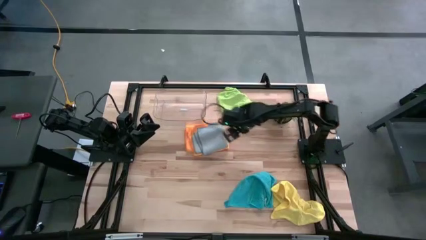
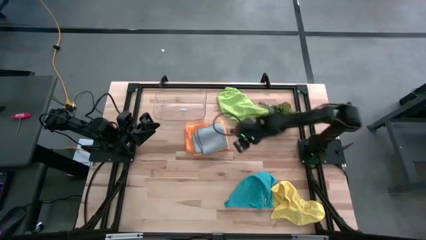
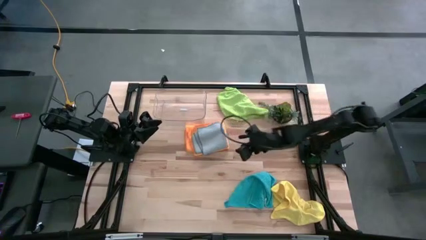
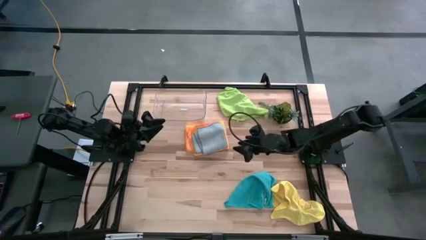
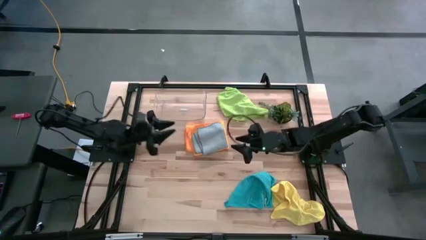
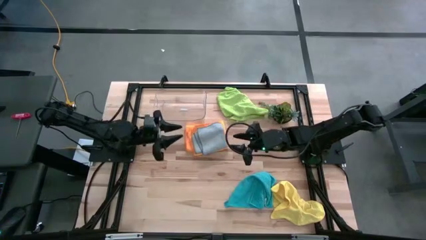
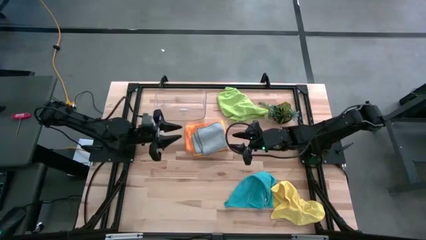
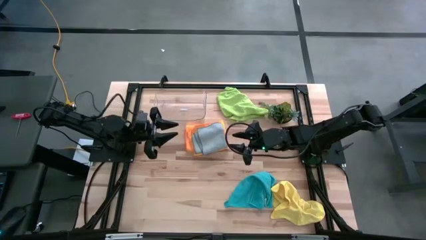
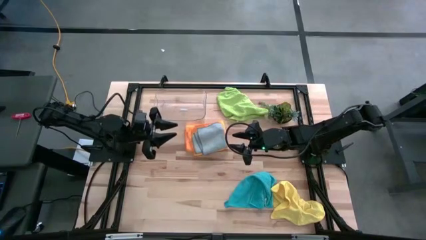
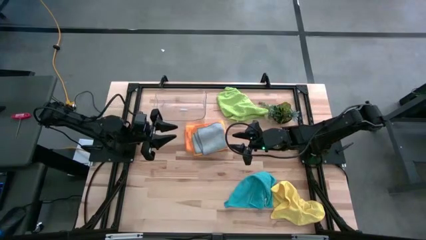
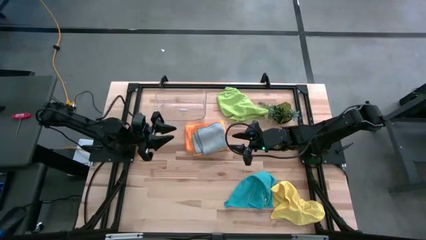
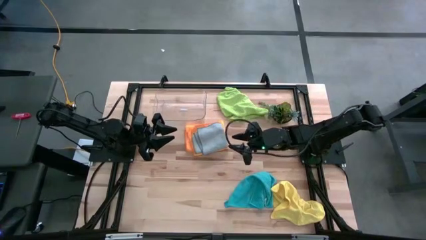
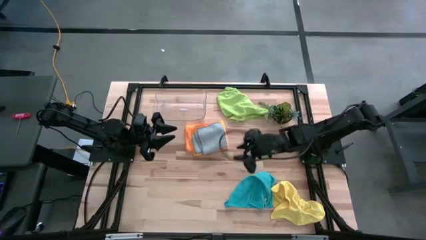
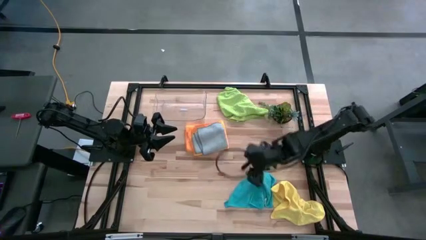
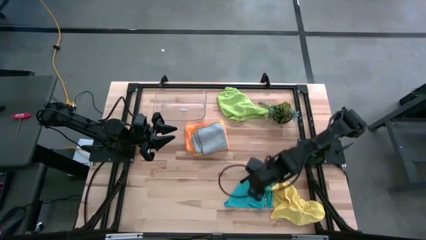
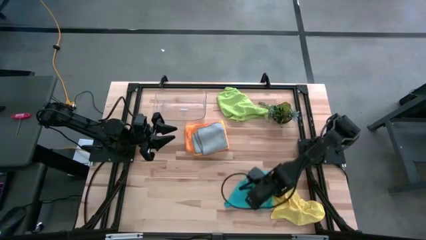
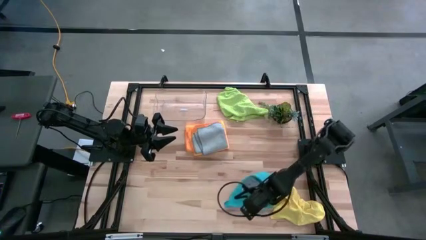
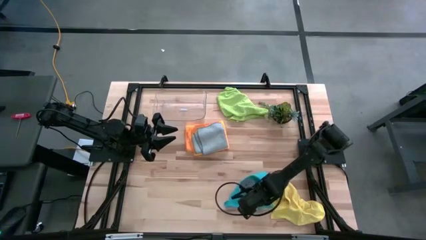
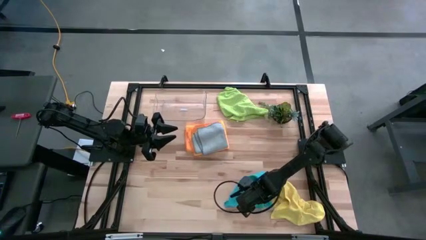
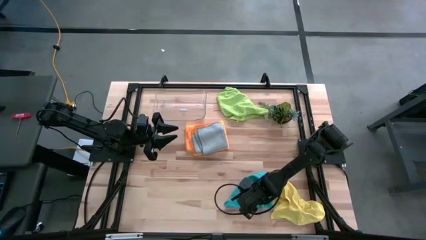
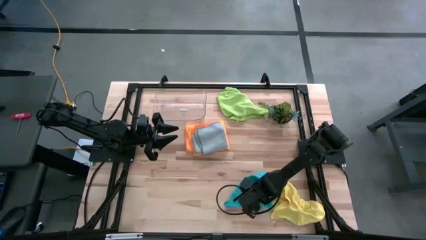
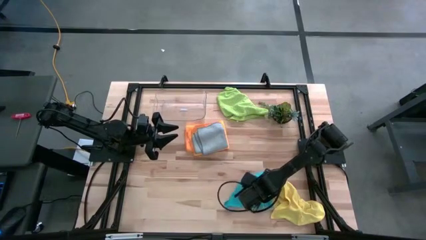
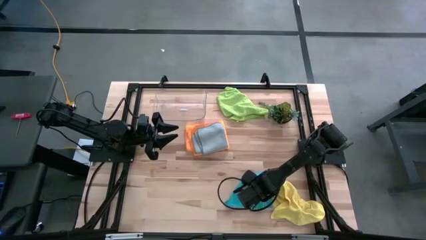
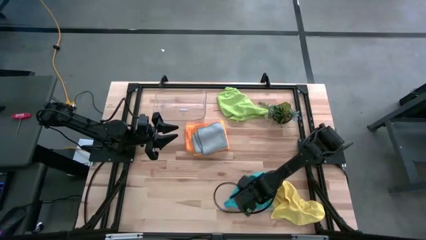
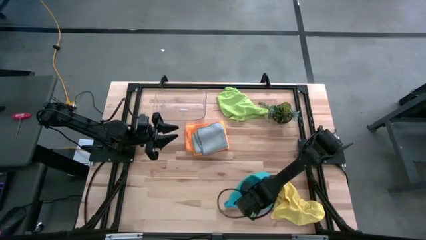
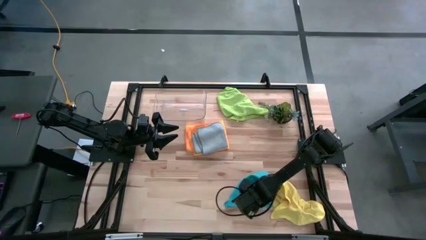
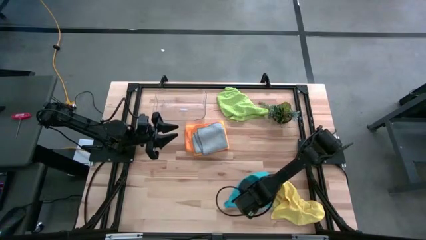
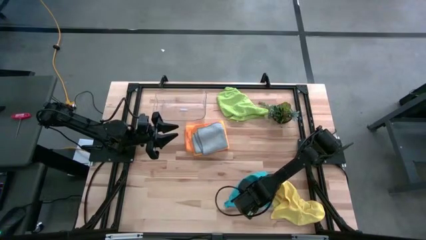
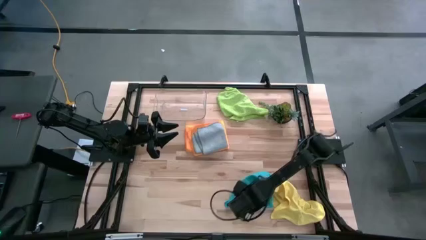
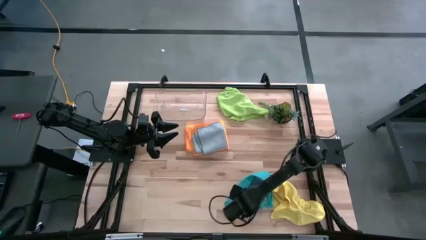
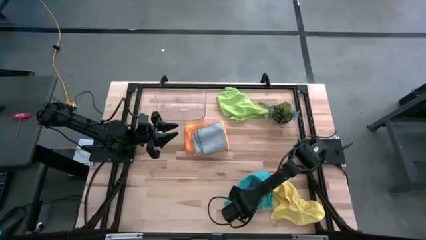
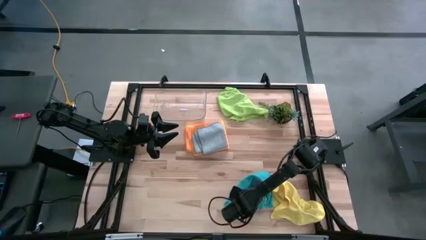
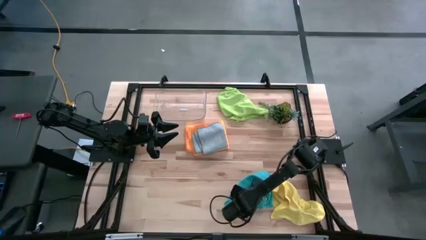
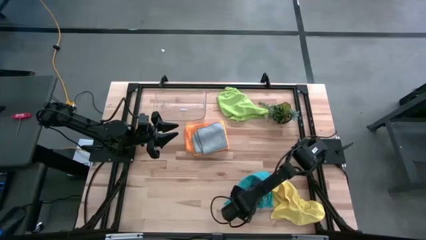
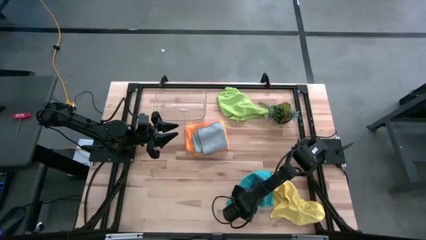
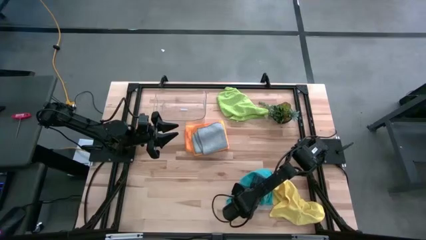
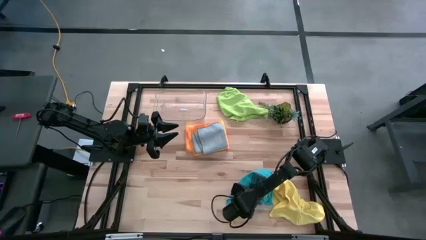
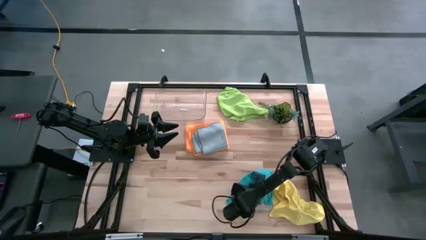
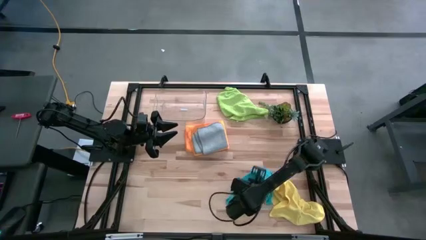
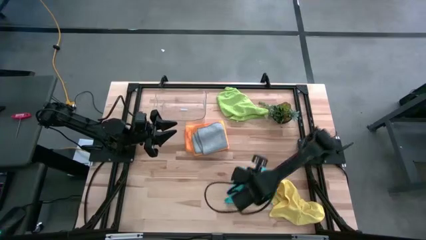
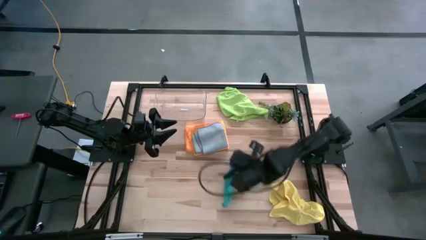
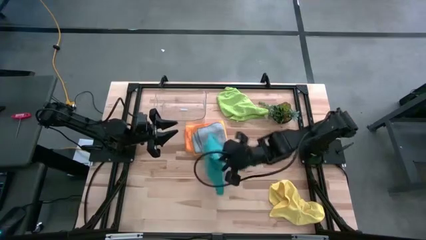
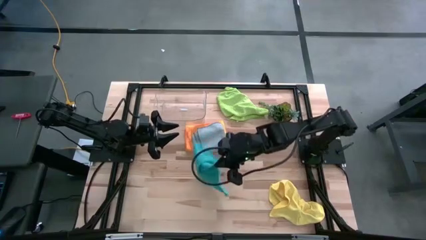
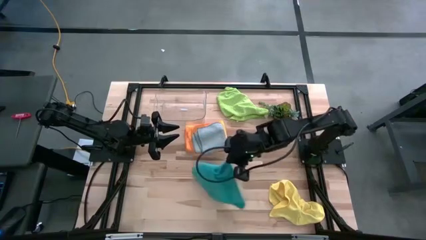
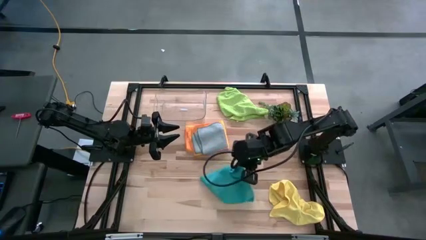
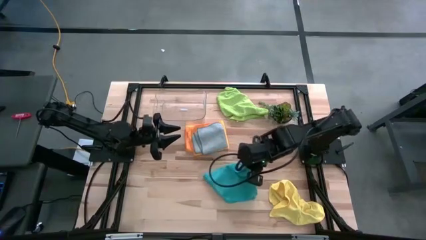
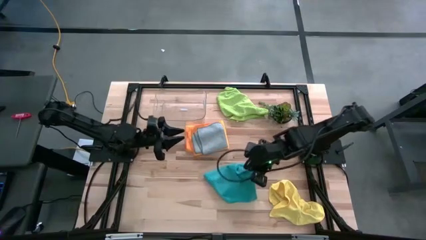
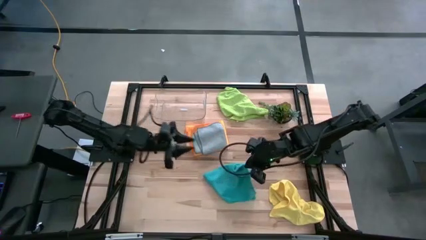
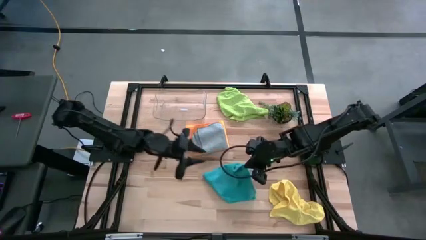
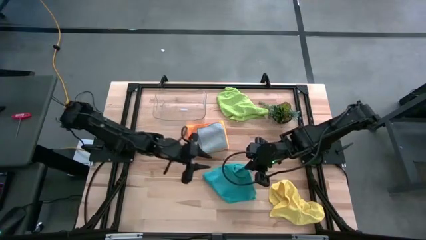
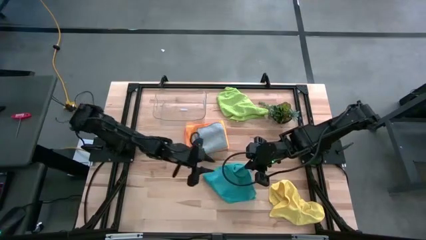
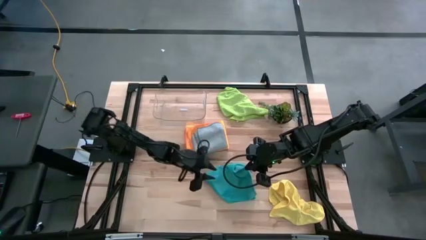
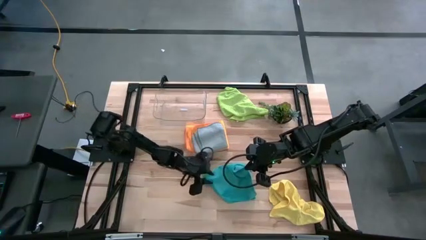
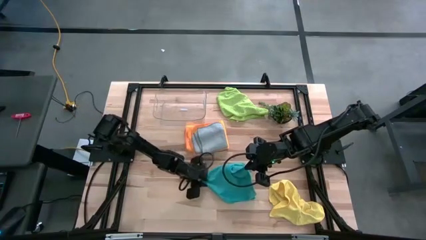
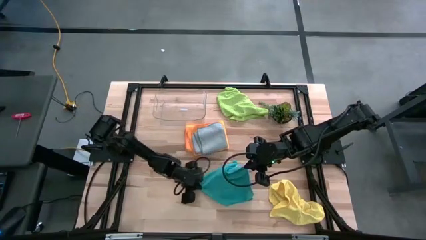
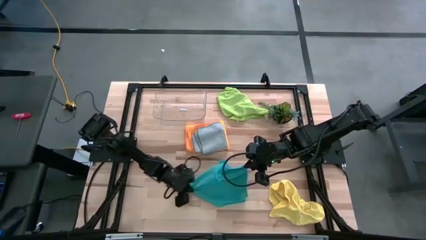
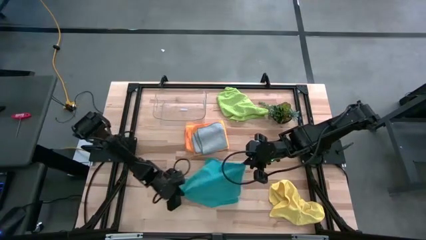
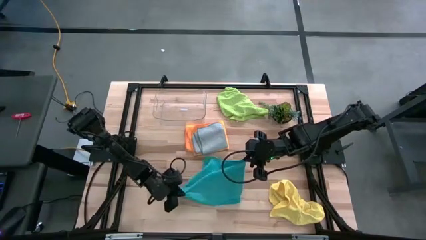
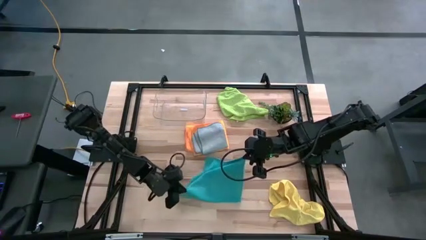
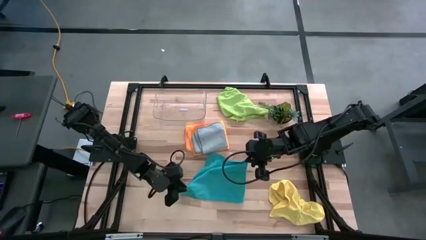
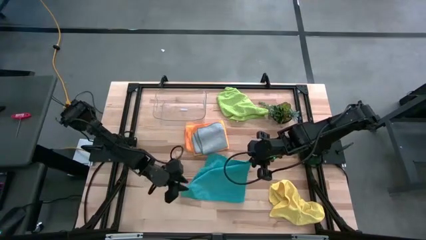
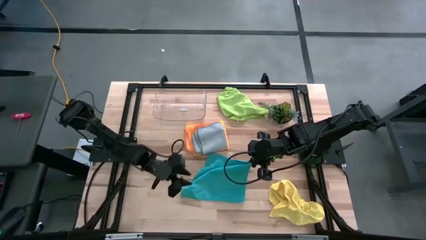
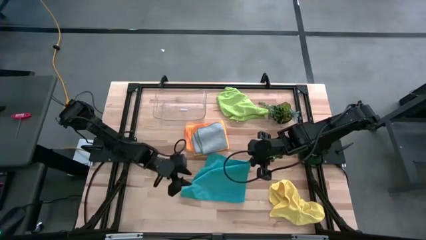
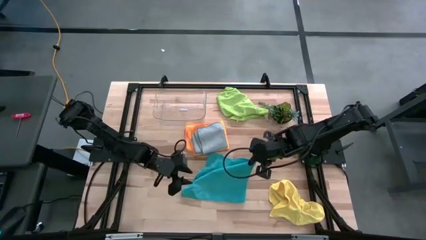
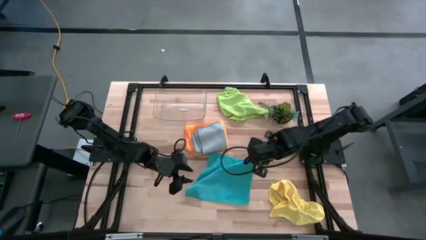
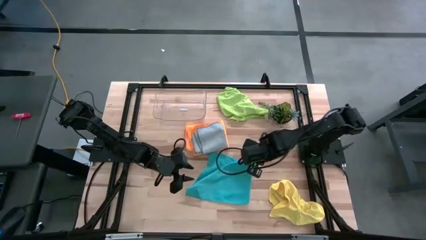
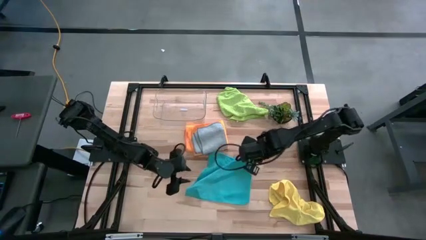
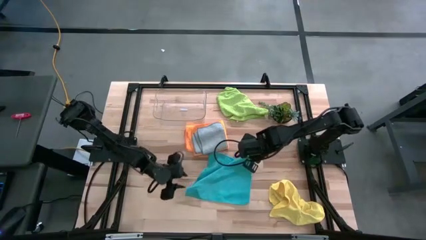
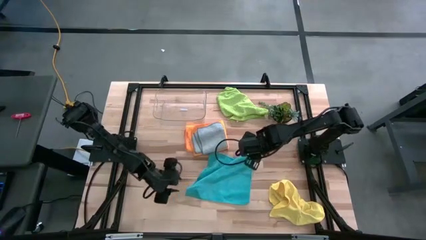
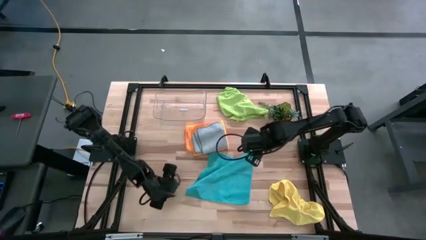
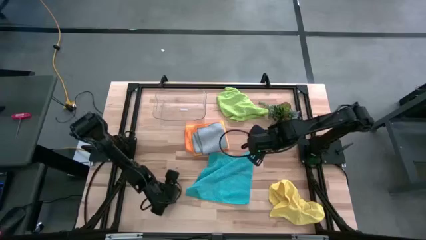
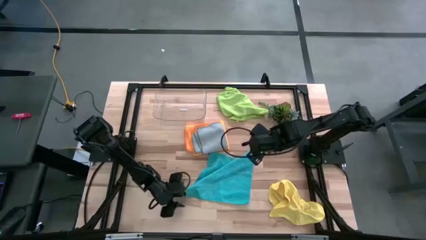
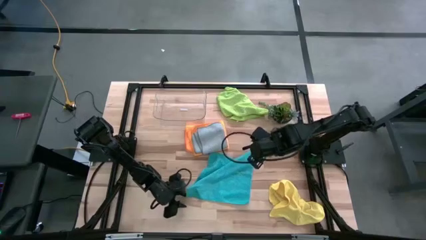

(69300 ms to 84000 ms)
Task: Fold microfiber towels
Fold the blue towel
